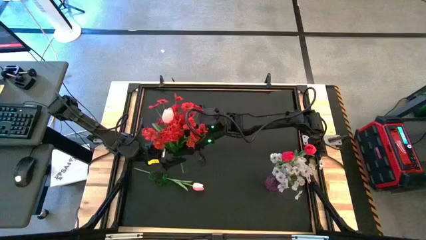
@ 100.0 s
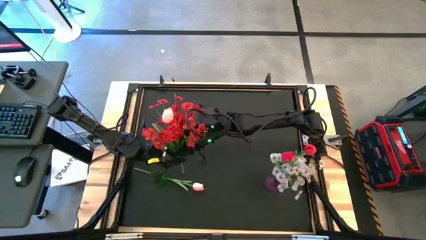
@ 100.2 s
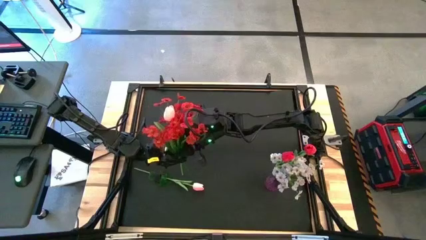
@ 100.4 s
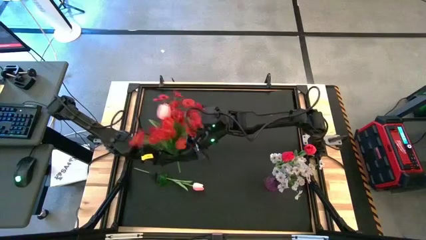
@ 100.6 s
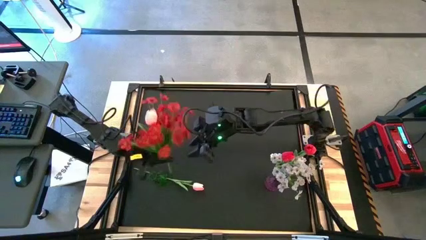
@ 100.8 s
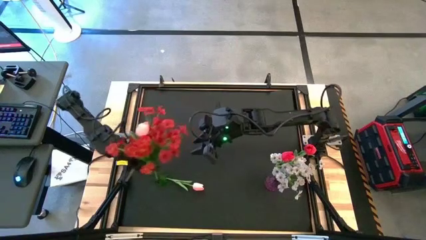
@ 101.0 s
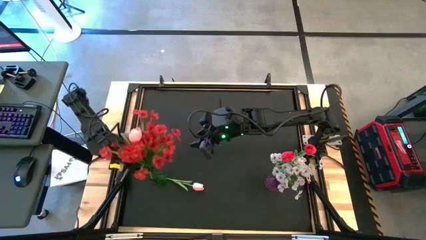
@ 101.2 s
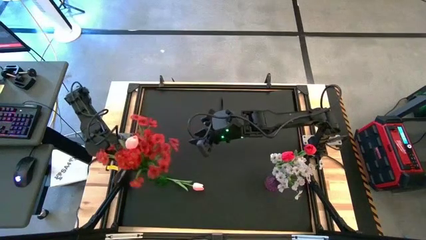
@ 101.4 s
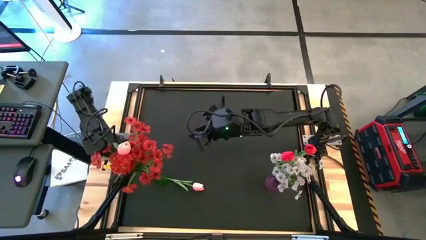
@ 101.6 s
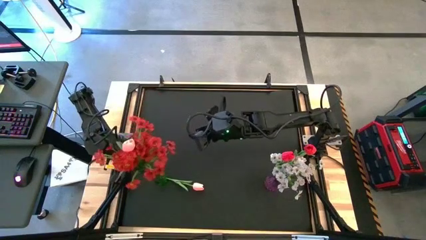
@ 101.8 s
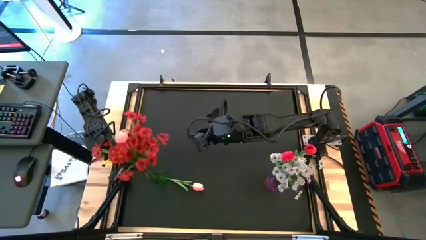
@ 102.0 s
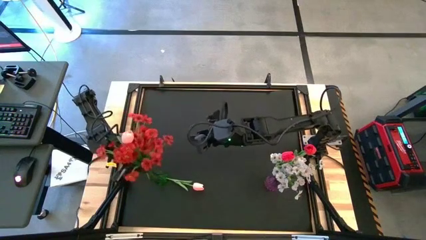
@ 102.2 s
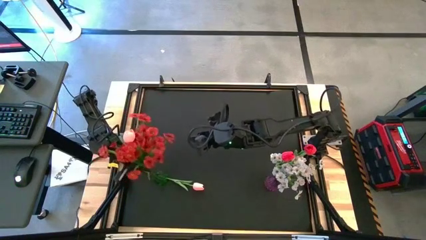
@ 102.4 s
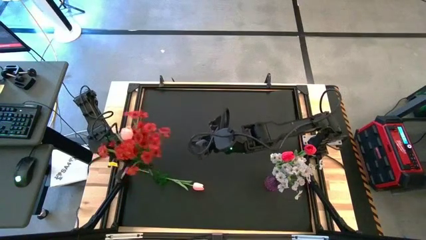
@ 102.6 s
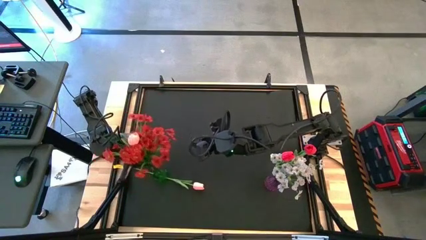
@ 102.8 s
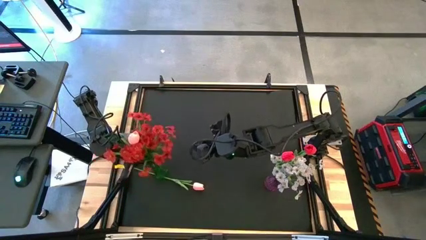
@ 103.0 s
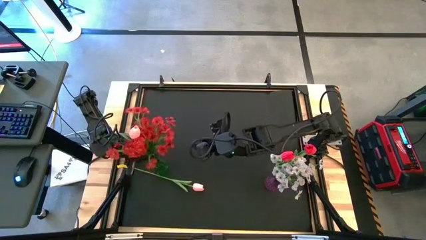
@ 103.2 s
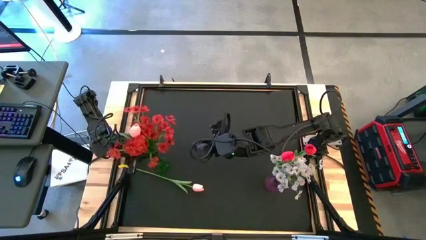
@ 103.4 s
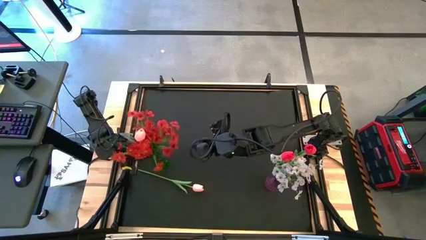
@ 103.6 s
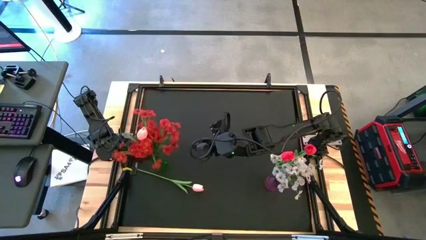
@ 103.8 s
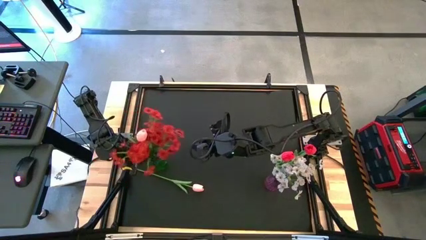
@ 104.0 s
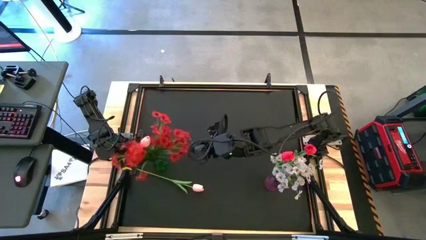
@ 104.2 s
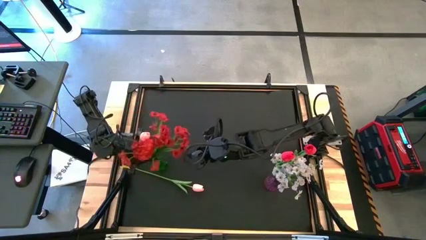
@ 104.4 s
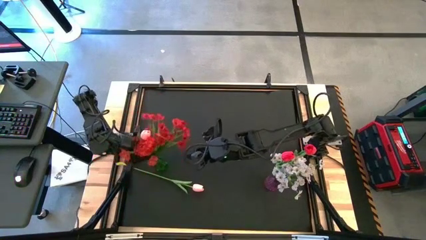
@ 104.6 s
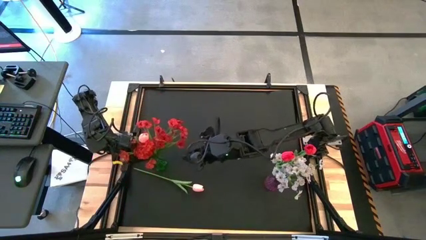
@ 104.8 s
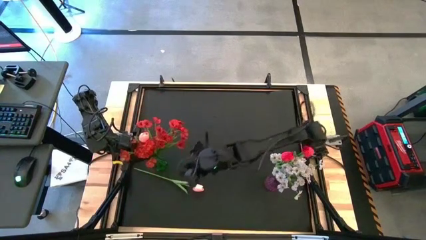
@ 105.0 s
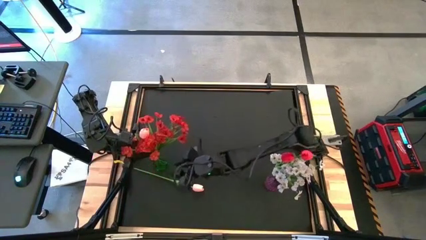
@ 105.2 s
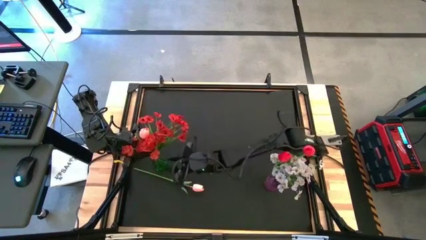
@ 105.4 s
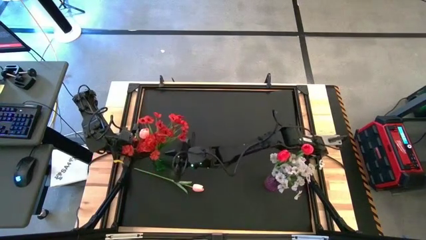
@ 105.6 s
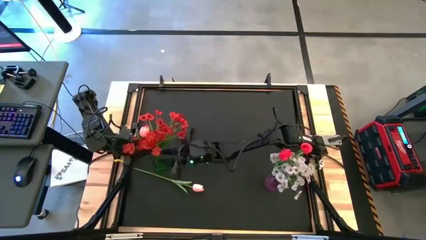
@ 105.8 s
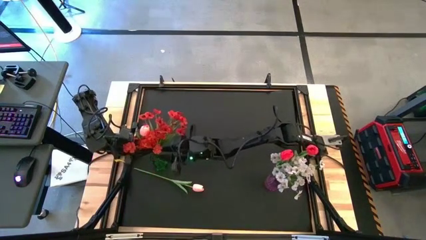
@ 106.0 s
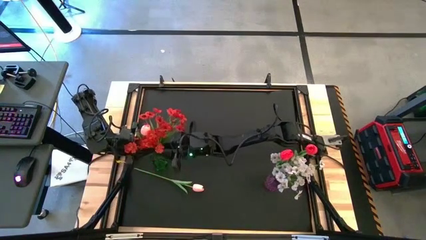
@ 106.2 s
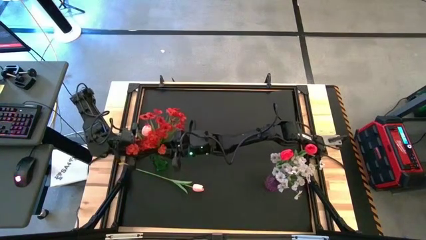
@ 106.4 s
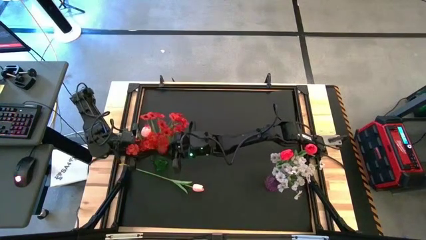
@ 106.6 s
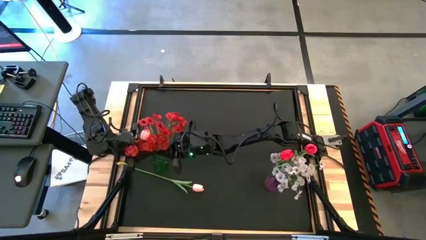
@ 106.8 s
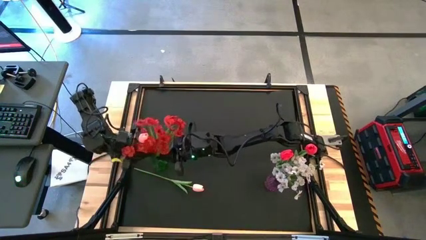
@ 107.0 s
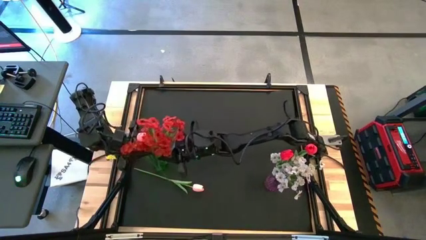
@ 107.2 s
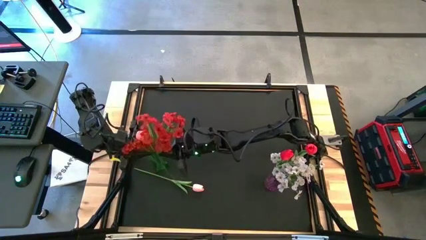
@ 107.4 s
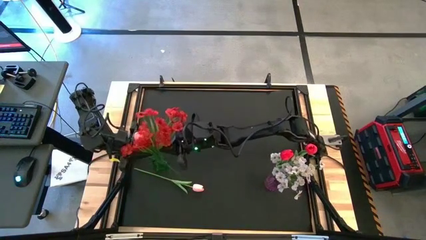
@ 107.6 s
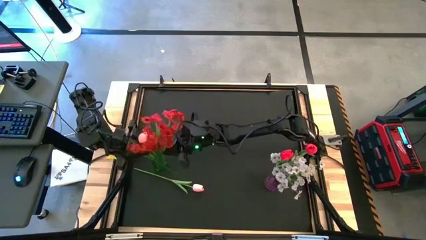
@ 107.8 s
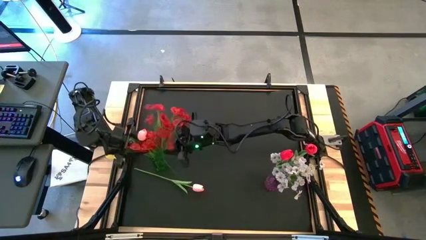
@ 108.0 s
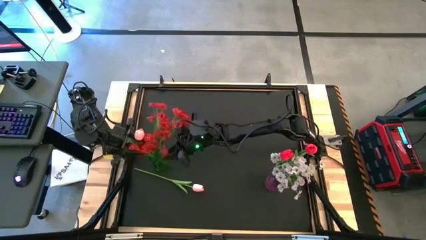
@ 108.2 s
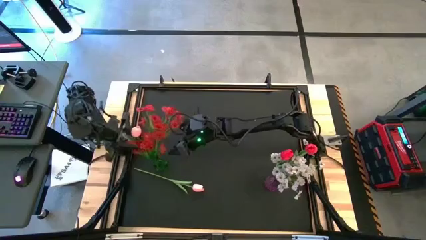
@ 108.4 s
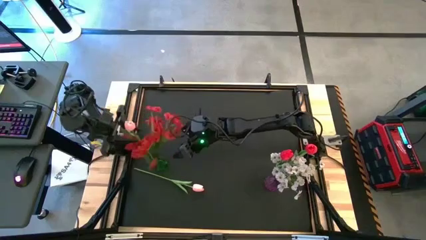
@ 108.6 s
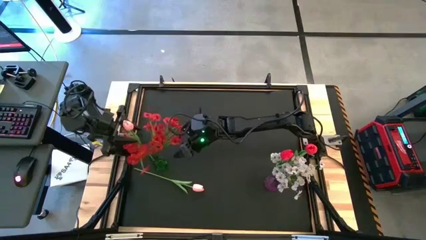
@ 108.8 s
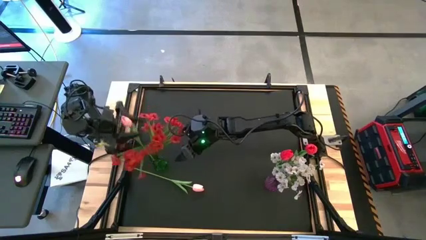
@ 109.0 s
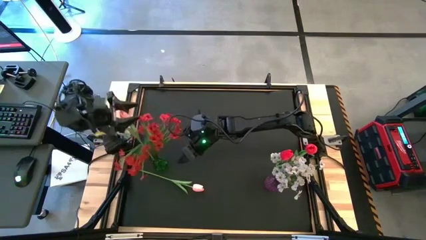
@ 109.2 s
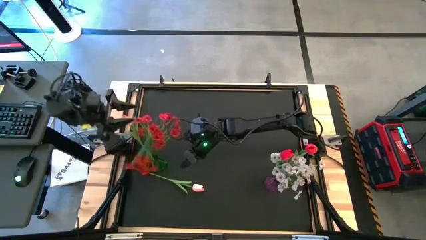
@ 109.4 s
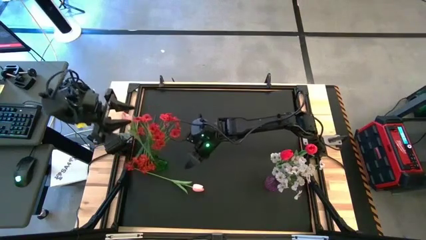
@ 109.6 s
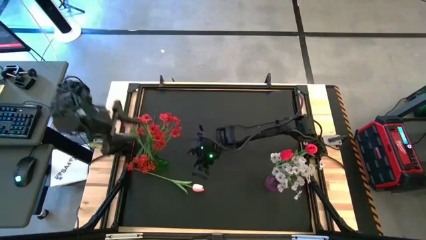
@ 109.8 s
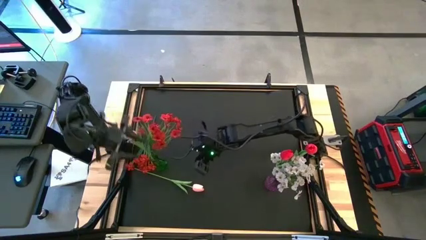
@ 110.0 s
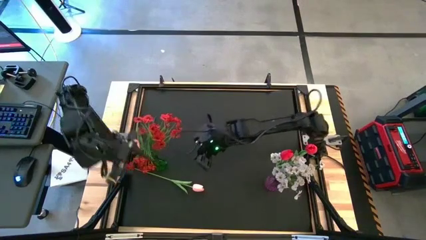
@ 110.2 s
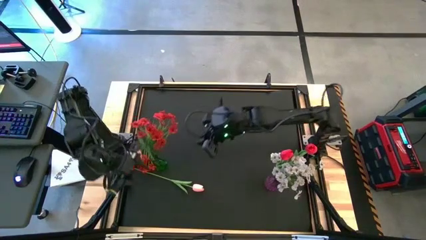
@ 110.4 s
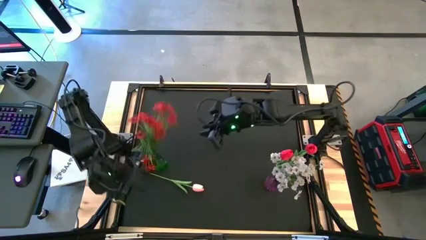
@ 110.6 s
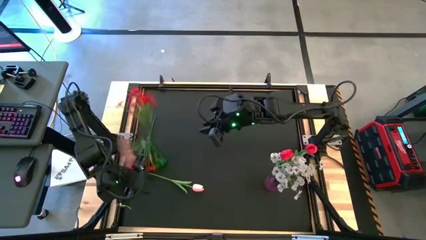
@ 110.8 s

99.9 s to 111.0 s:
Task: Sort flowers into vase by color
Adjust the green vase

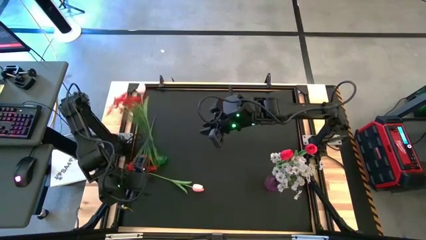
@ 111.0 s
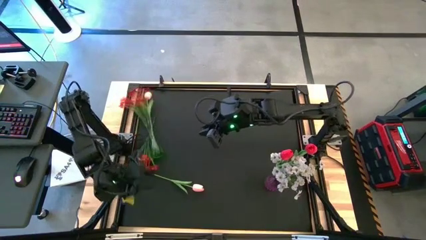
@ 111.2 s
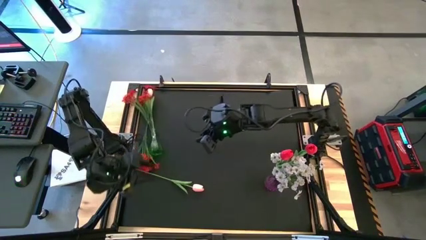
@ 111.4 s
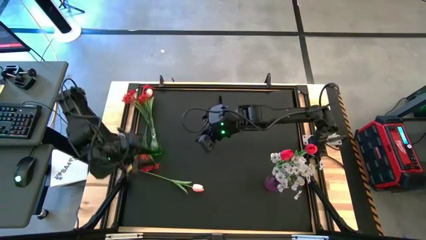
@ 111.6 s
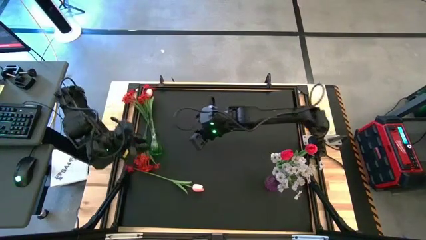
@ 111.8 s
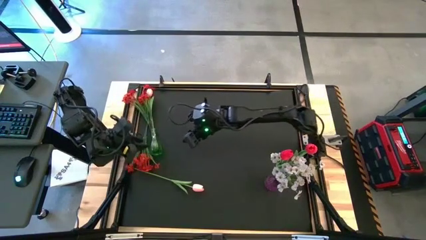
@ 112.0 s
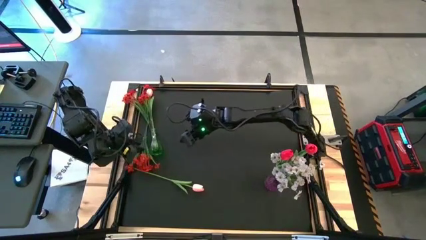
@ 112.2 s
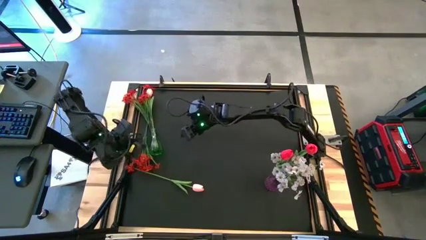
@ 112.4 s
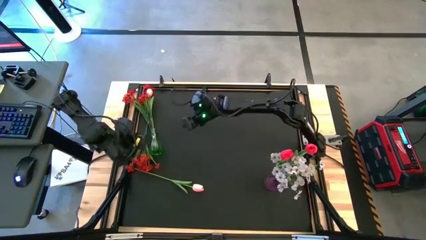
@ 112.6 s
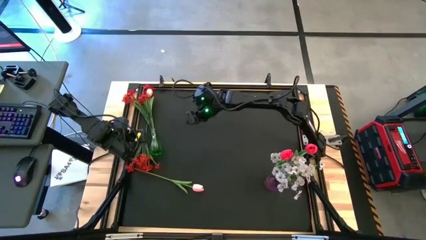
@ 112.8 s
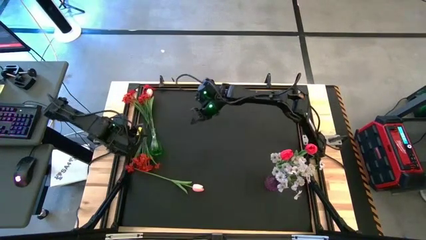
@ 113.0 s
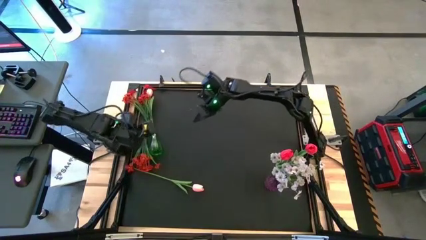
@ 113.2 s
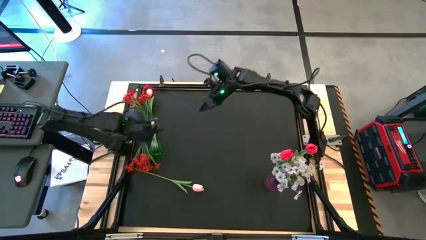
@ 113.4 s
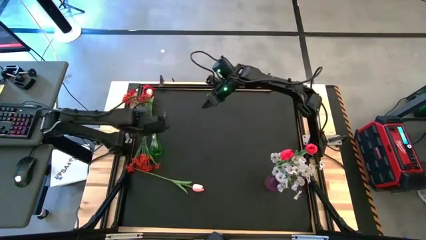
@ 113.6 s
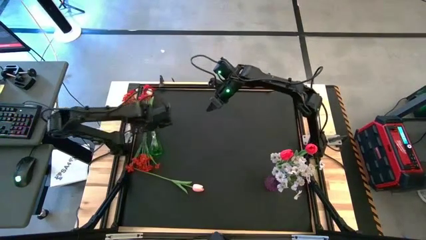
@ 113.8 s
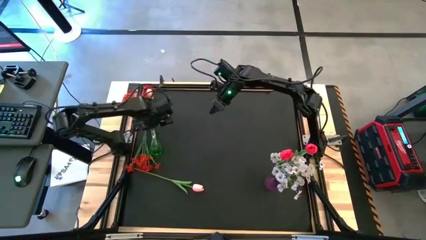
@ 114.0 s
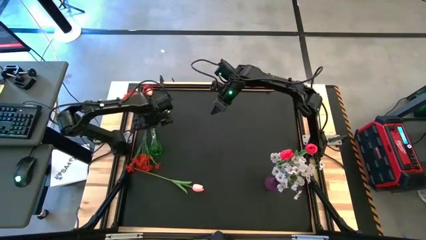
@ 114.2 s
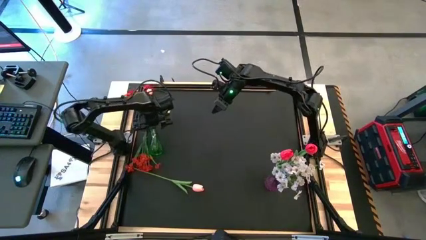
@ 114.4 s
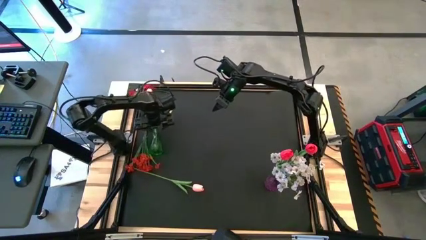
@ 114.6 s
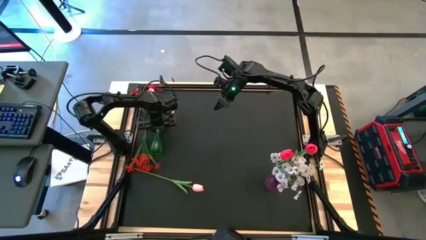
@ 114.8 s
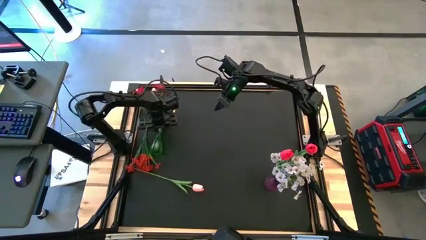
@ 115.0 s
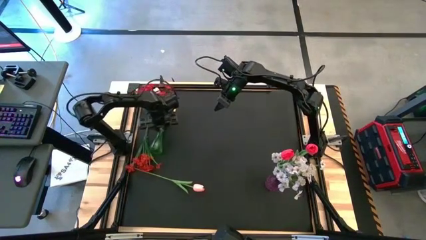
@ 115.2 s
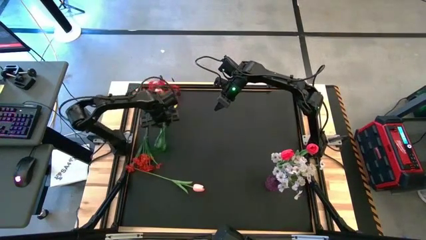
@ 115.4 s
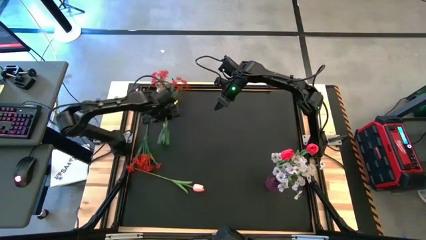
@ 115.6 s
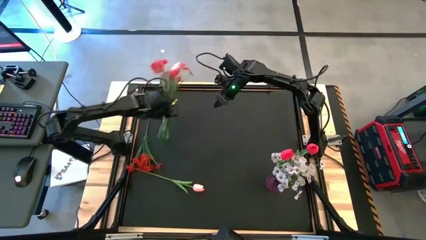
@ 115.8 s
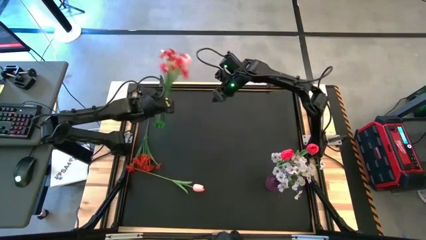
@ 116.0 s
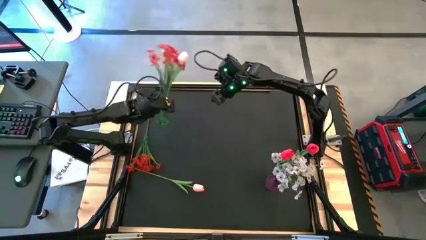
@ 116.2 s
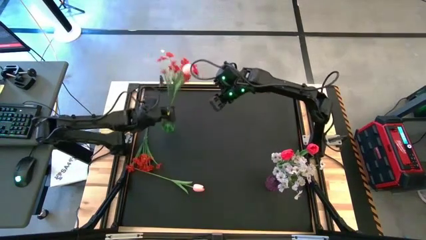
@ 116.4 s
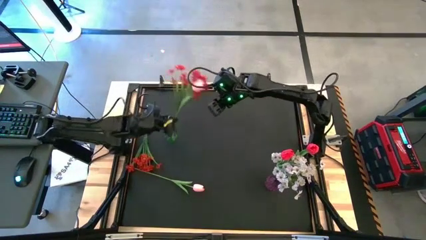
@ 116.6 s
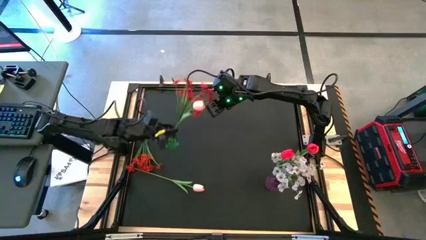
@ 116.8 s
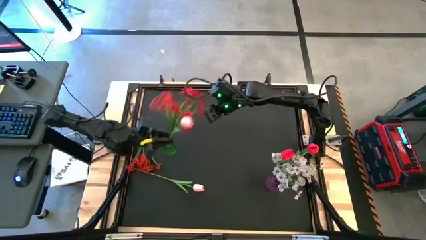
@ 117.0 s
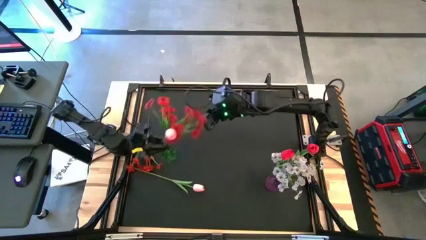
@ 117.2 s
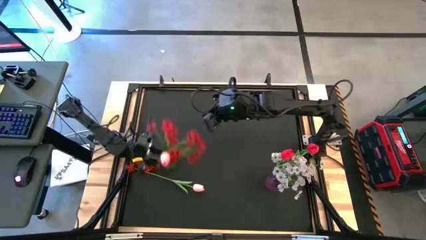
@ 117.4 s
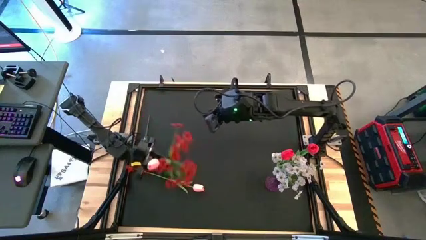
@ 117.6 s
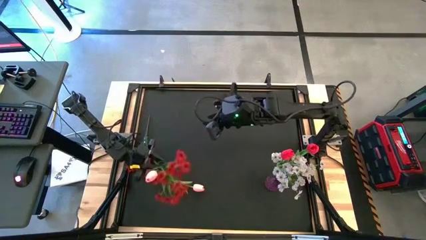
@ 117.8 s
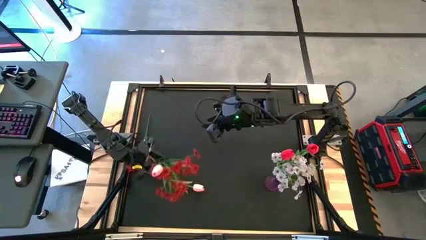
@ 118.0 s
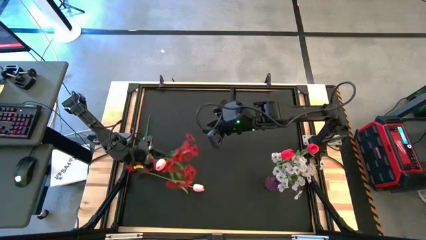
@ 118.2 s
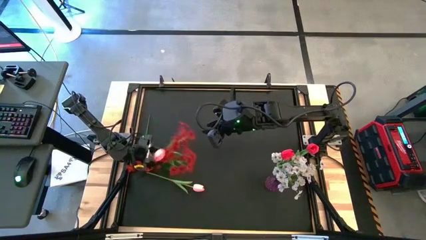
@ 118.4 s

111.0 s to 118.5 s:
Adjust the green vase
